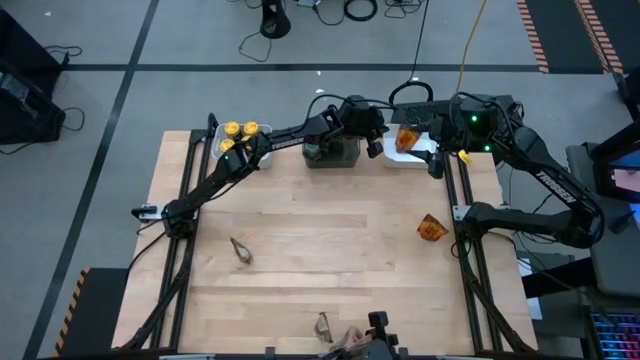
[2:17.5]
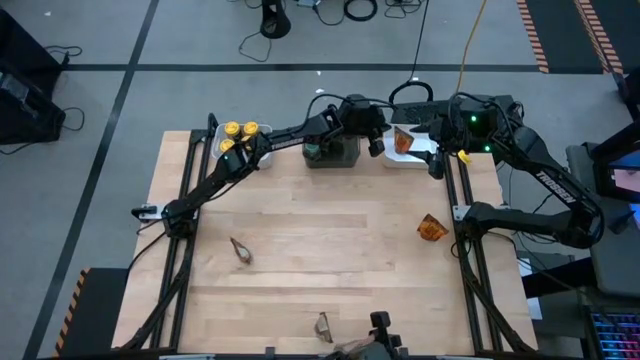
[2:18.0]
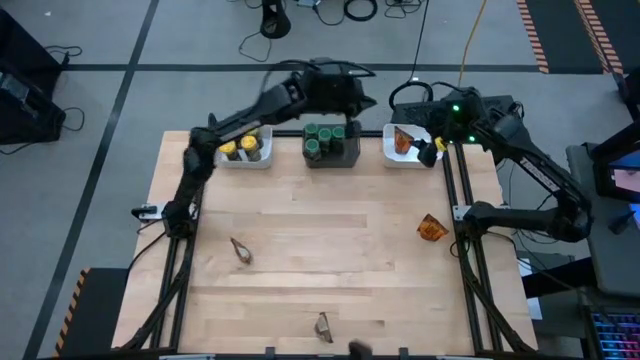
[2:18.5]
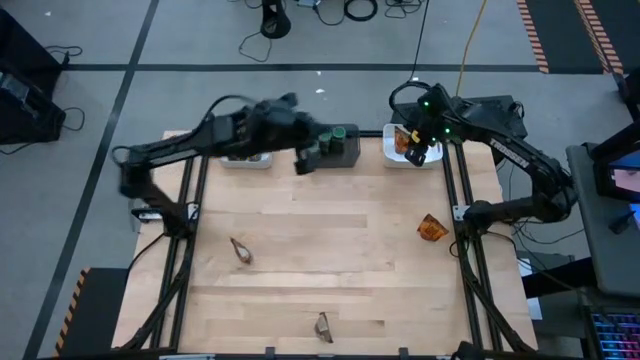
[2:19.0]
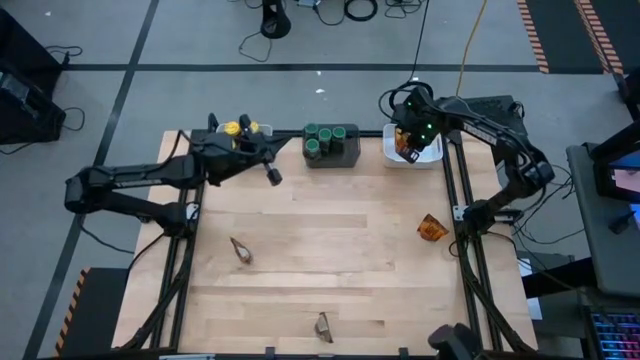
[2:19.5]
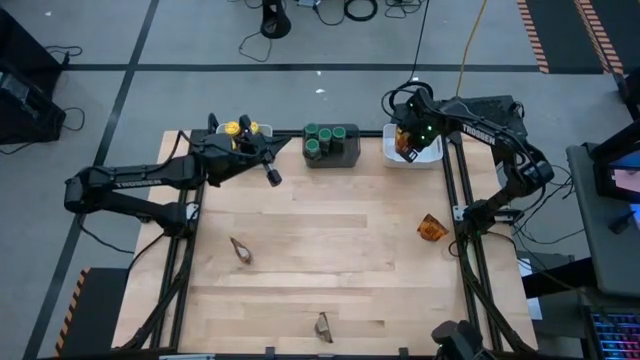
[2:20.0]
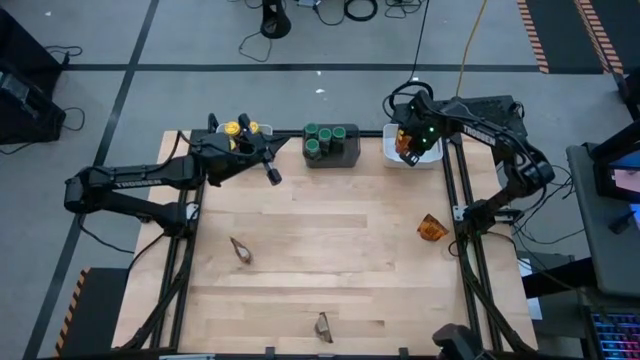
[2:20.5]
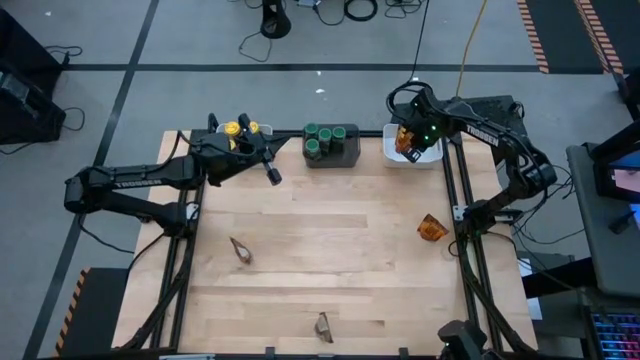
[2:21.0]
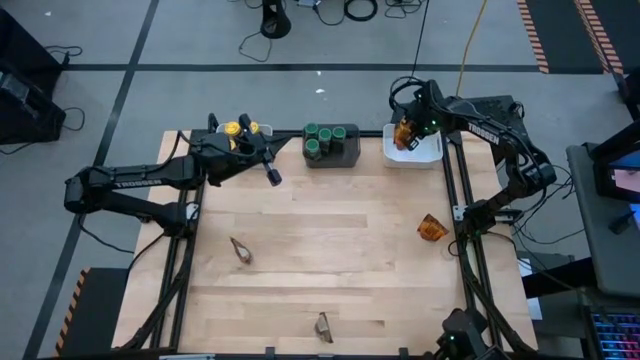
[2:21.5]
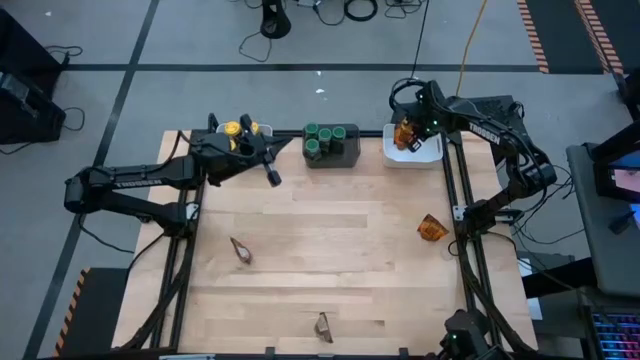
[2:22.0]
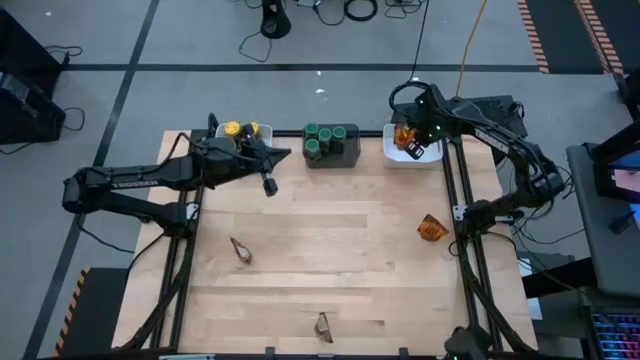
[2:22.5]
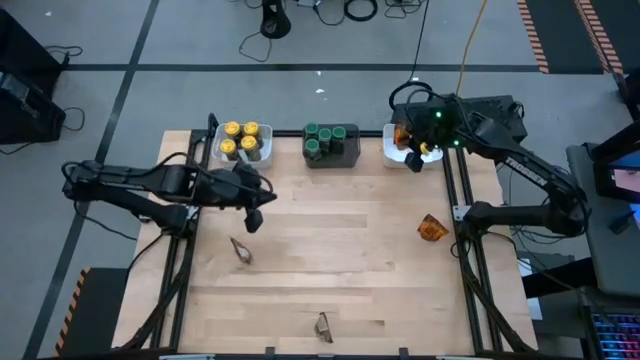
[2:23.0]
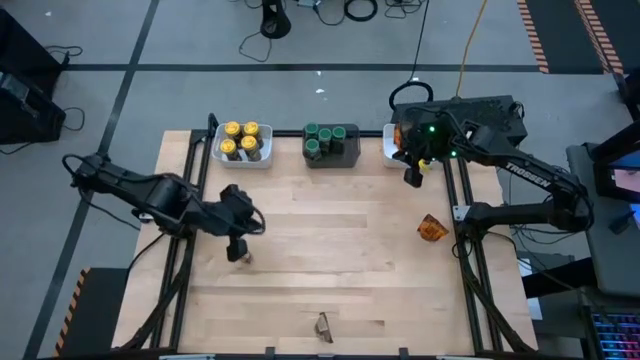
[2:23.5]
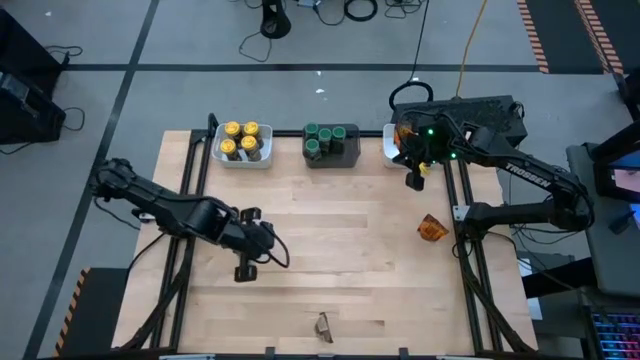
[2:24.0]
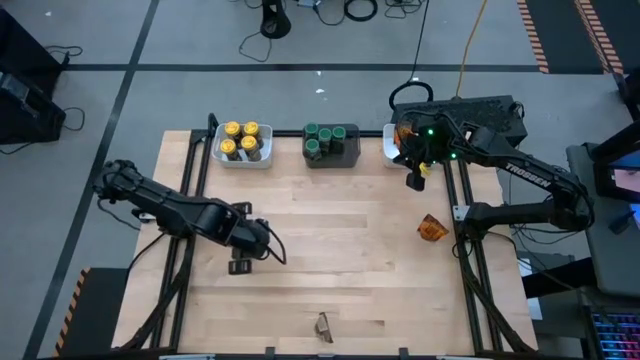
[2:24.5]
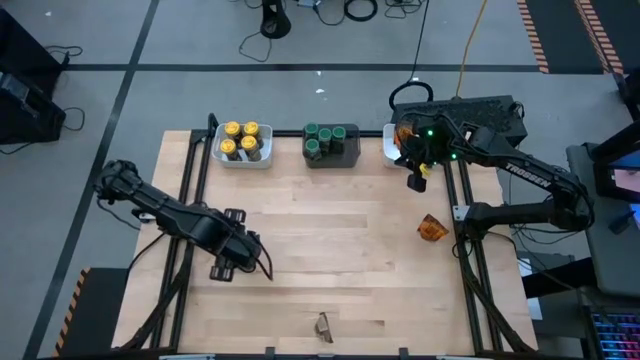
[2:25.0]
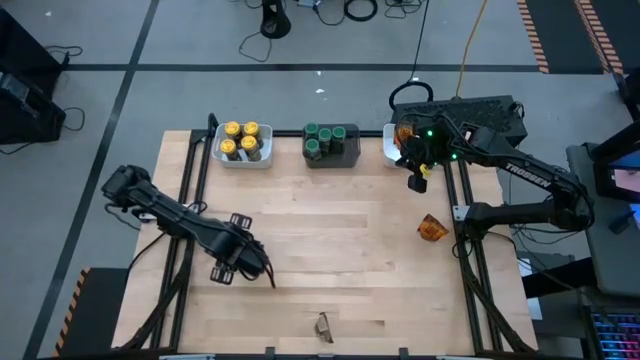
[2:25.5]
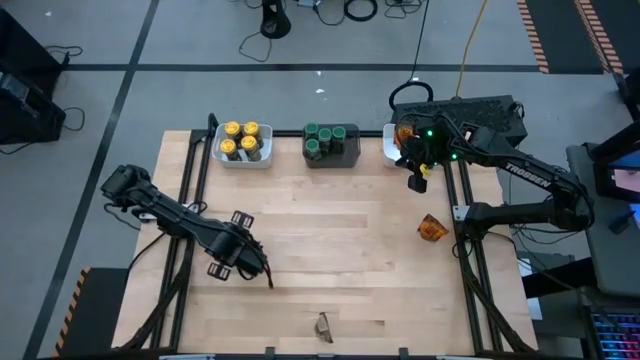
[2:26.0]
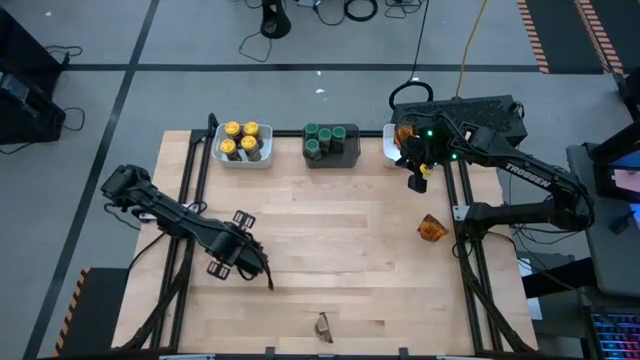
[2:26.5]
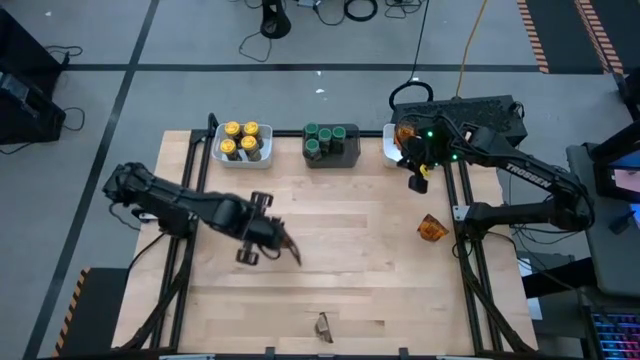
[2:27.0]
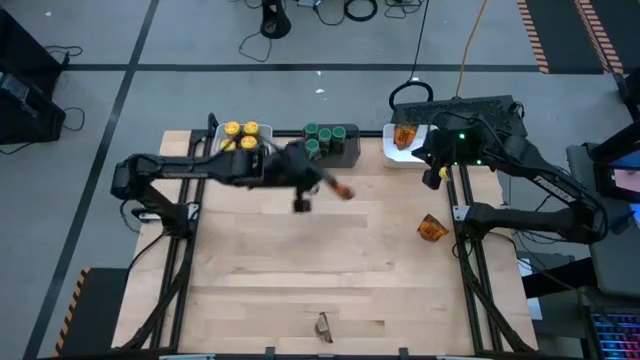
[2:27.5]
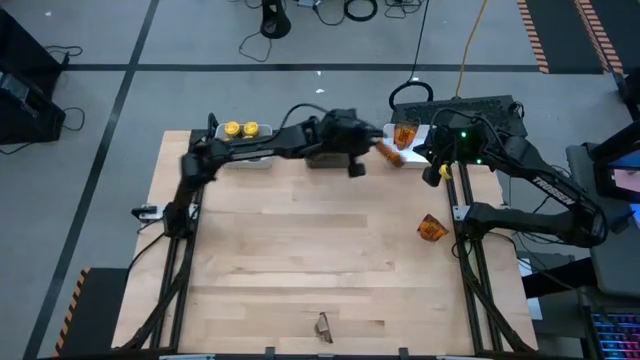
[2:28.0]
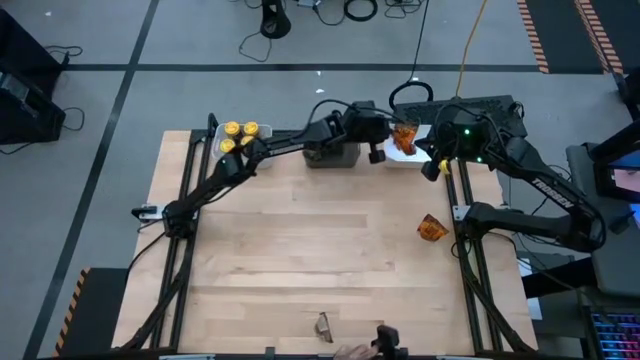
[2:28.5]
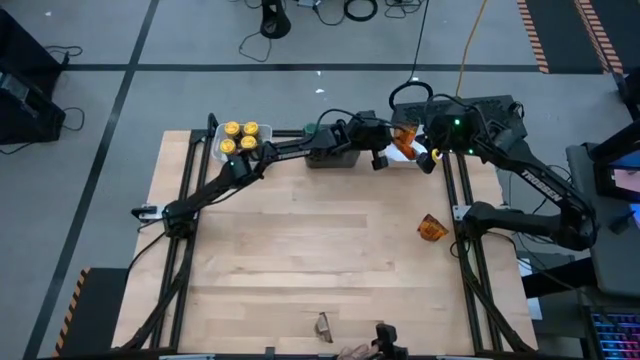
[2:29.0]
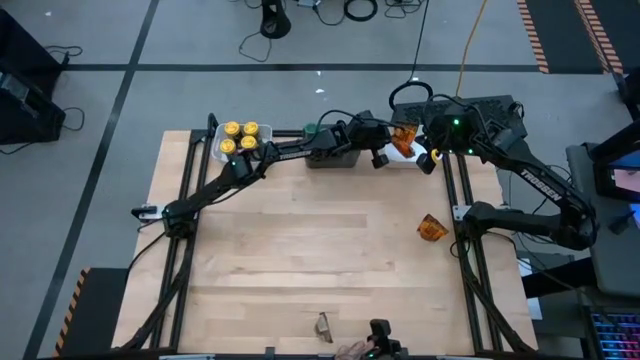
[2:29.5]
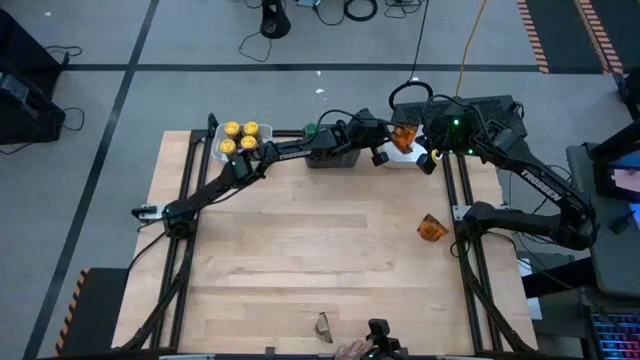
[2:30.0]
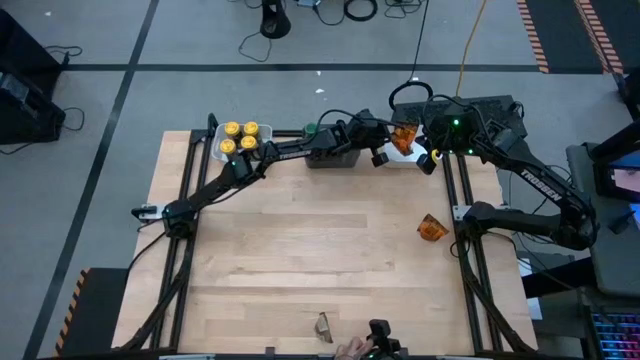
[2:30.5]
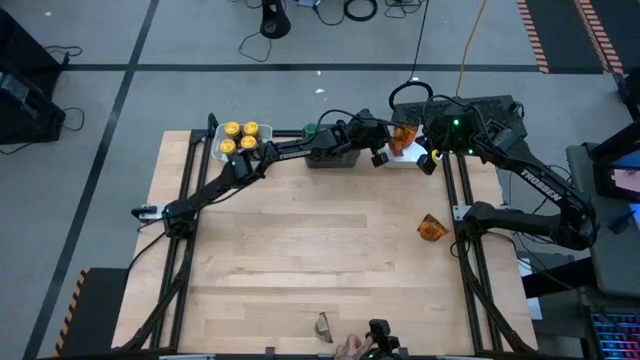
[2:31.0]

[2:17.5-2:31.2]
Task: Sort spices by type
Put the top left orange seasoning pack into the right white bin

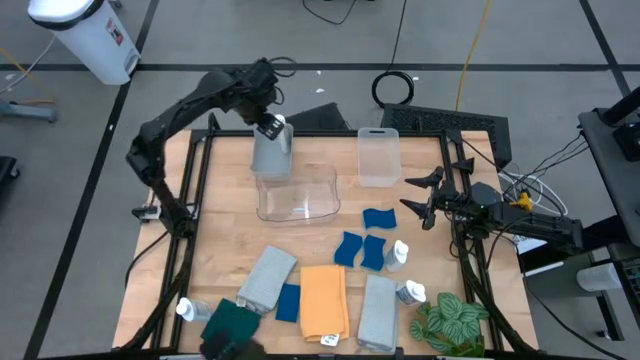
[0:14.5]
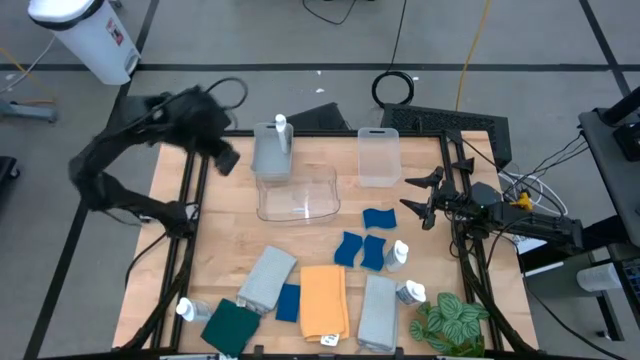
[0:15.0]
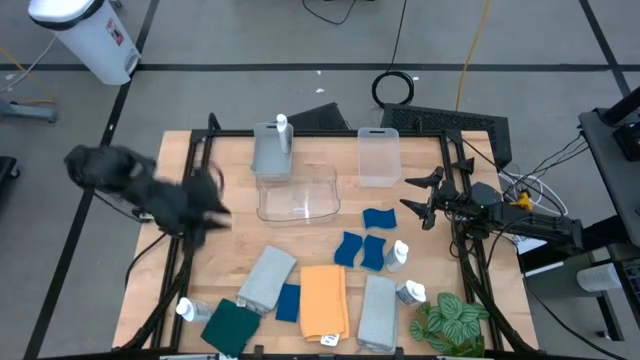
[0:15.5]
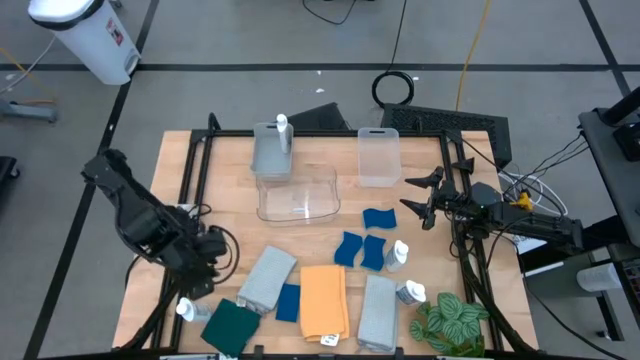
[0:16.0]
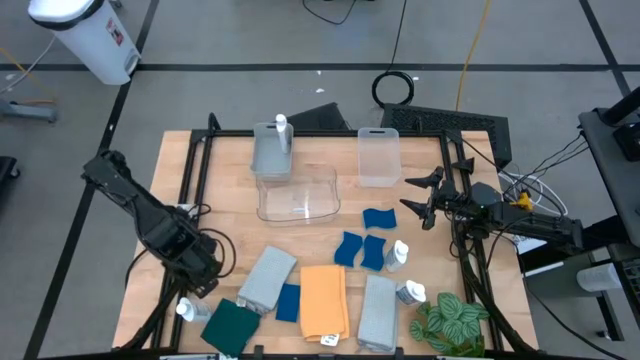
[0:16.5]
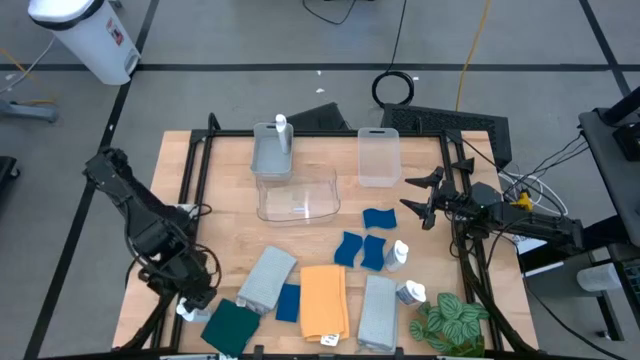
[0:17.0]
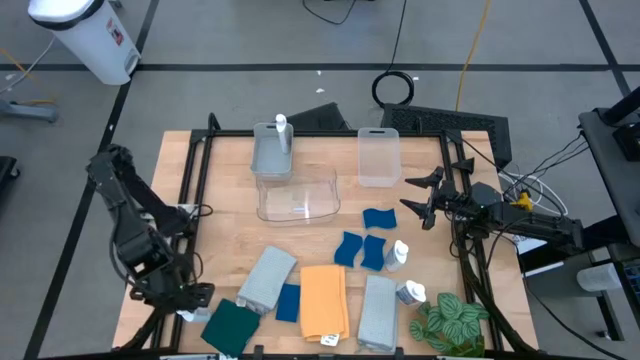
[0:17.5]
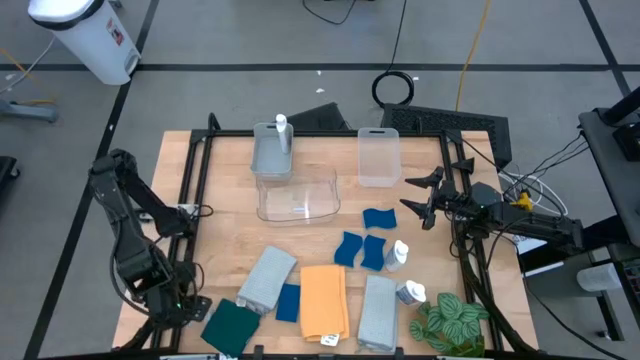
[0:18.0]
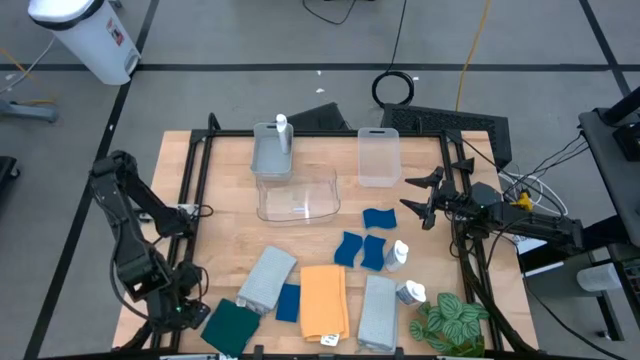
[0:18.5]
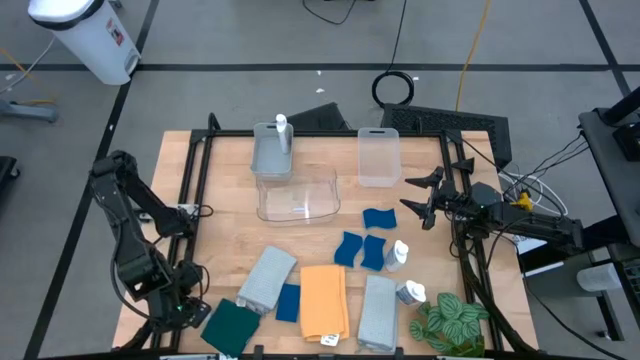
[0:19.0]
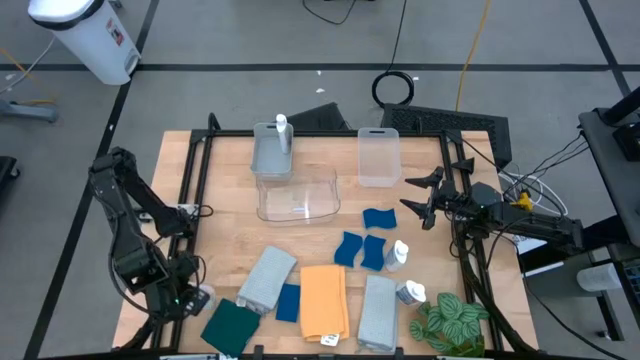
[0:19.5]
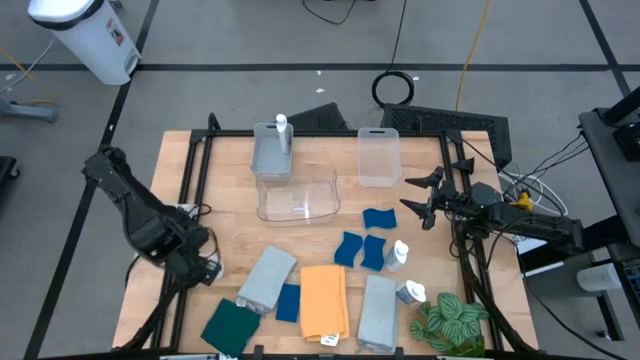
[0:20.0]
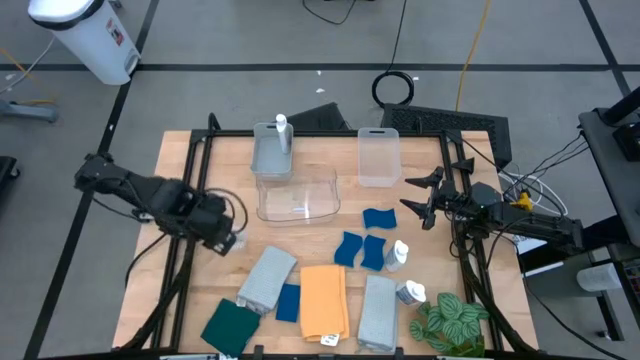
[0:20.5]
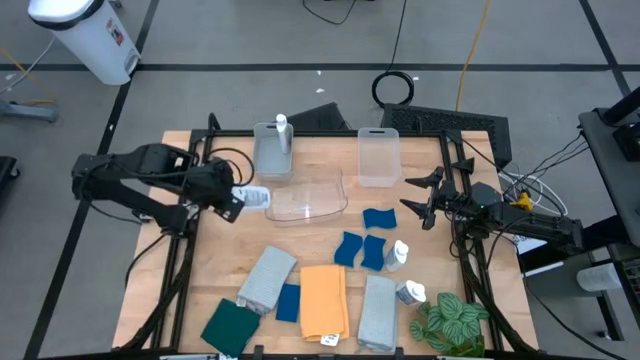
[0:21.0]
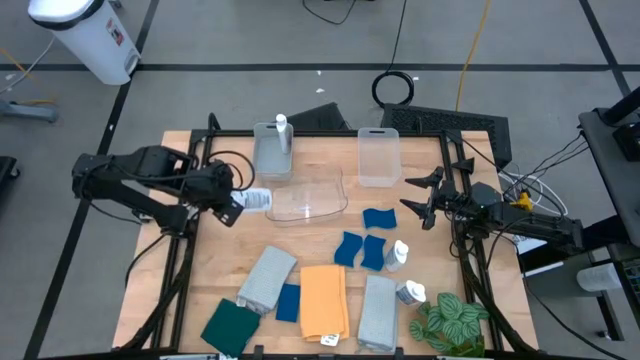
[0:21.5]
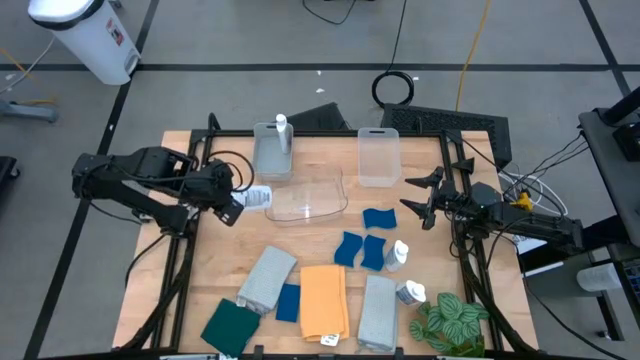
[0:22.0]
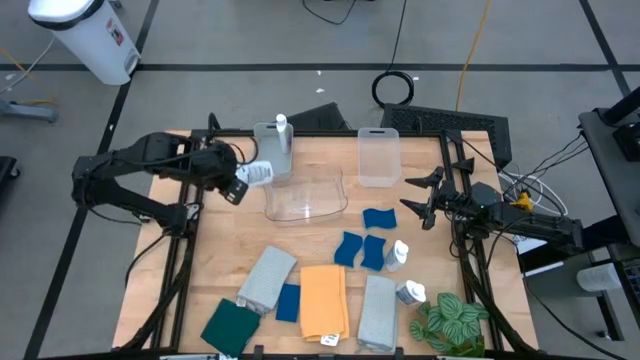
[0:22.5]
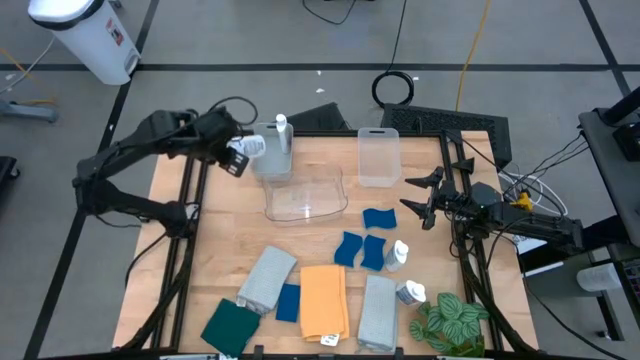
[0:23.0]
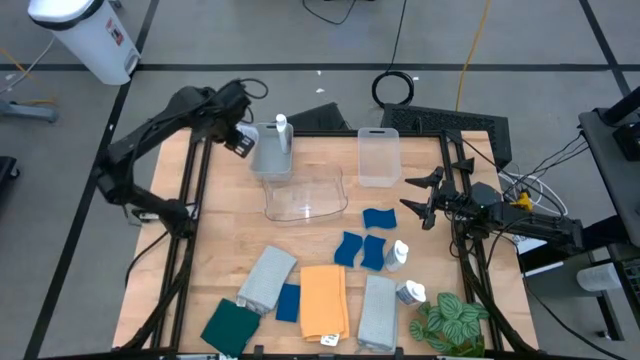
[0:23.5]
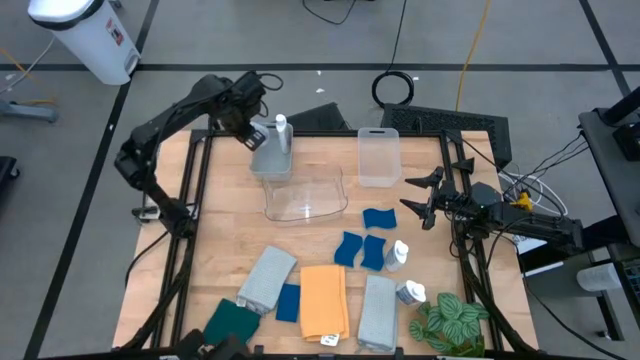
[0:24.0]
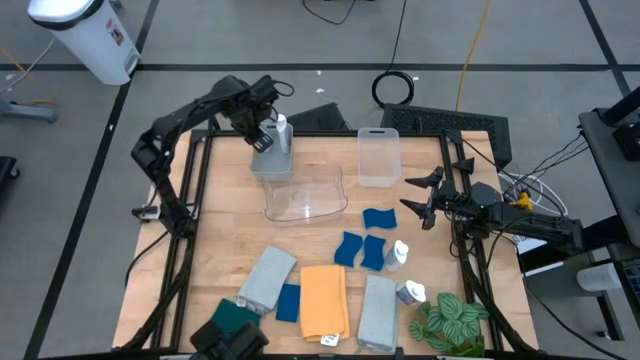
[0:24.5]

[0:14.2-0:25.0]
Task: Pick & Place Kitchen Items
Put the white plastic restorer bottle into the gray bin
